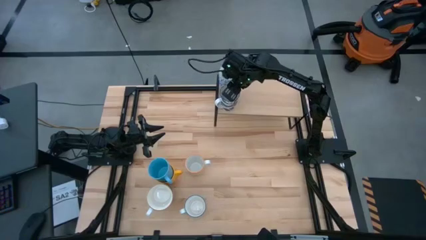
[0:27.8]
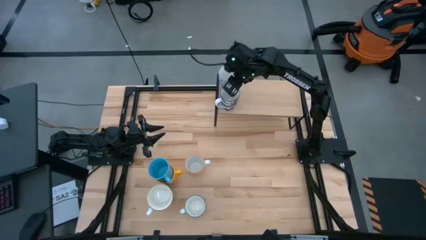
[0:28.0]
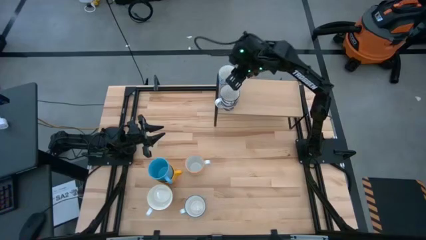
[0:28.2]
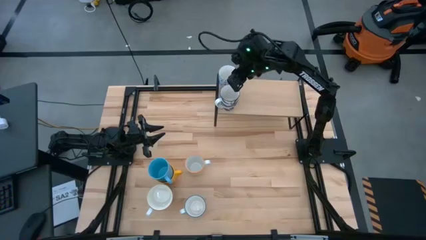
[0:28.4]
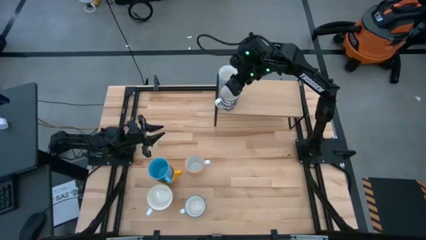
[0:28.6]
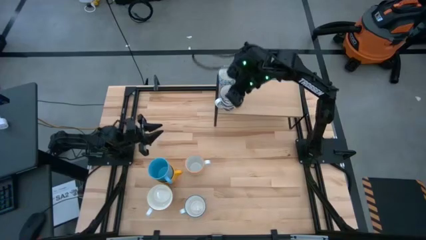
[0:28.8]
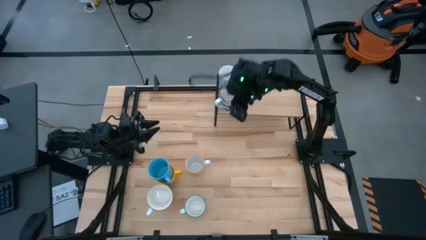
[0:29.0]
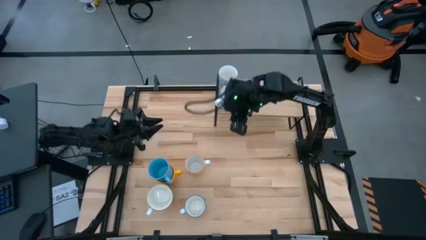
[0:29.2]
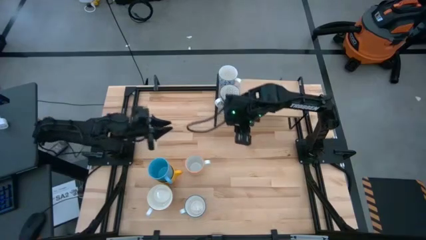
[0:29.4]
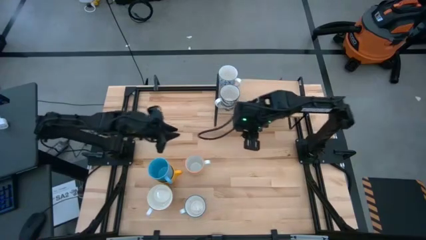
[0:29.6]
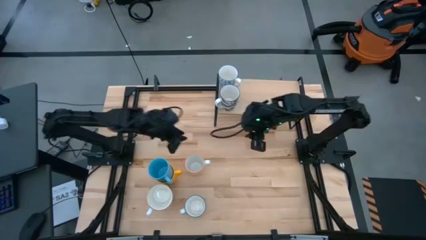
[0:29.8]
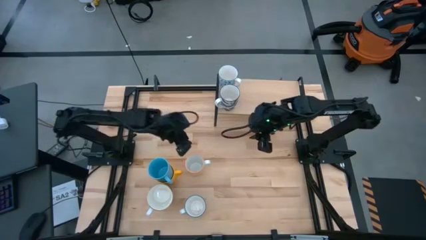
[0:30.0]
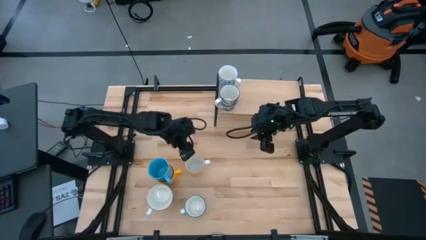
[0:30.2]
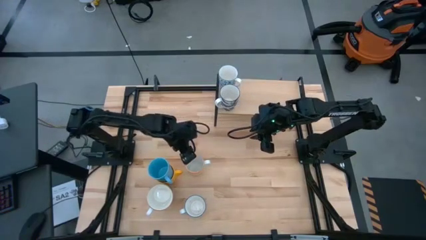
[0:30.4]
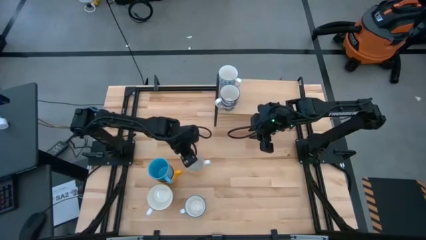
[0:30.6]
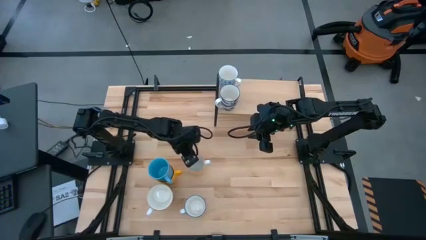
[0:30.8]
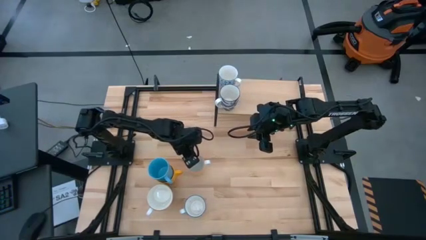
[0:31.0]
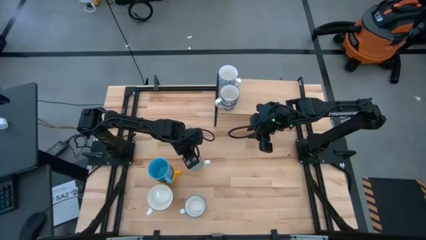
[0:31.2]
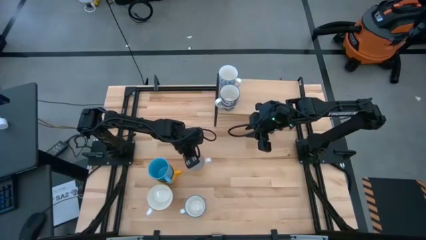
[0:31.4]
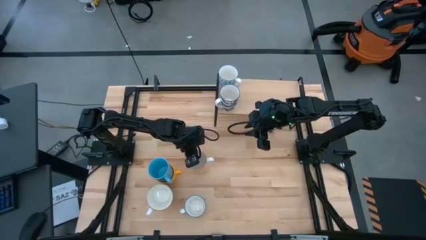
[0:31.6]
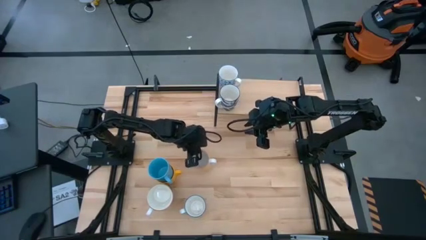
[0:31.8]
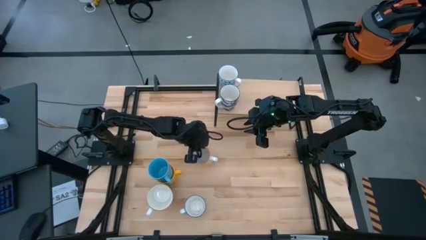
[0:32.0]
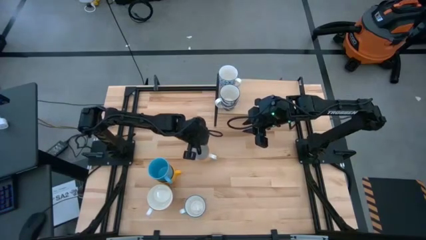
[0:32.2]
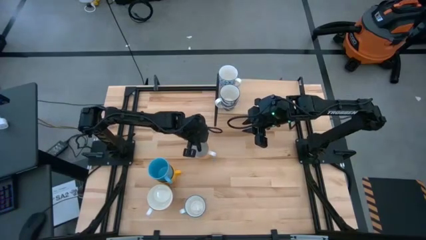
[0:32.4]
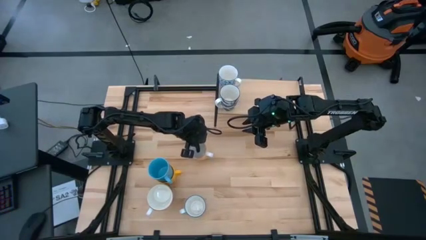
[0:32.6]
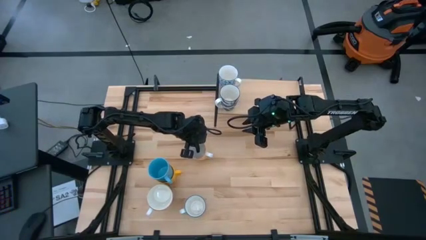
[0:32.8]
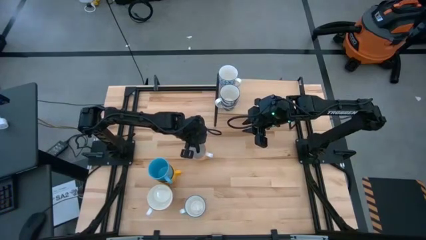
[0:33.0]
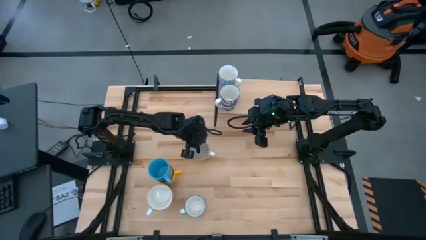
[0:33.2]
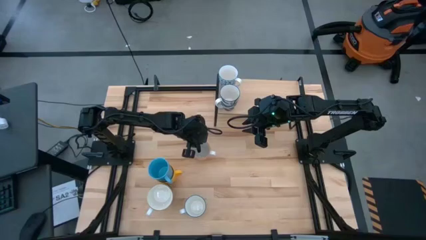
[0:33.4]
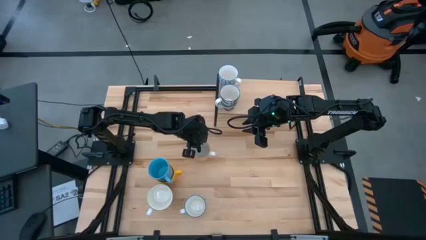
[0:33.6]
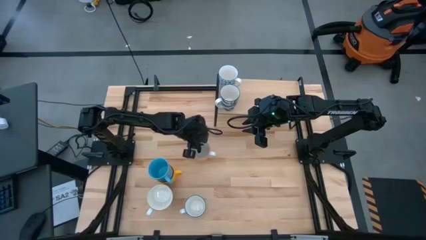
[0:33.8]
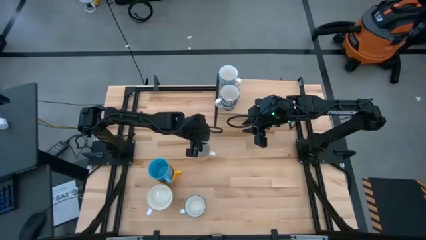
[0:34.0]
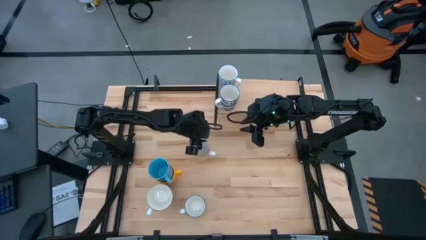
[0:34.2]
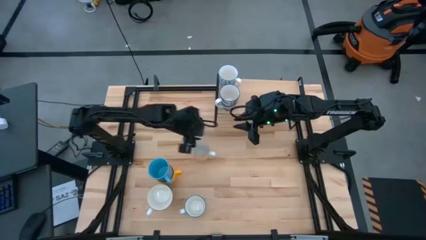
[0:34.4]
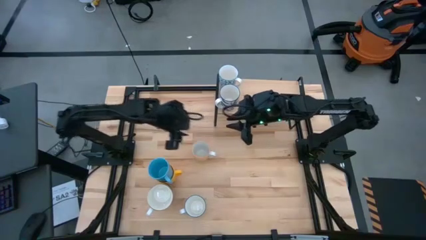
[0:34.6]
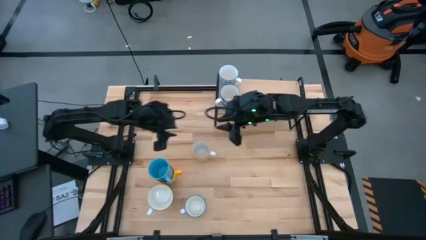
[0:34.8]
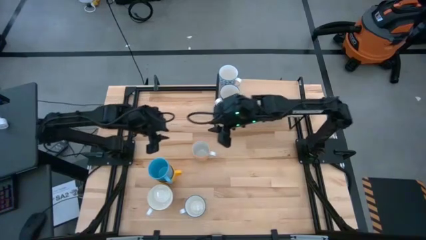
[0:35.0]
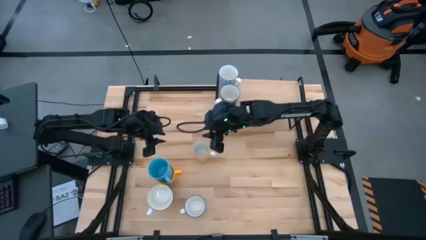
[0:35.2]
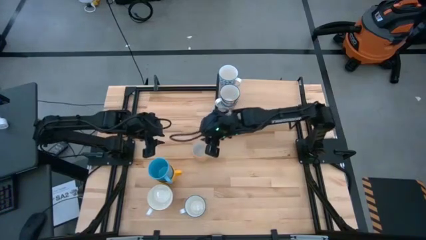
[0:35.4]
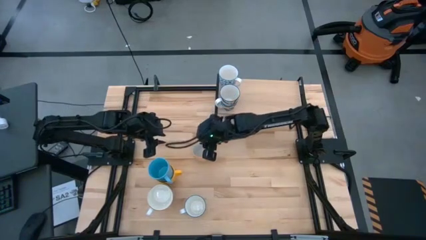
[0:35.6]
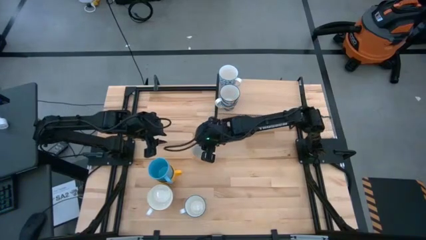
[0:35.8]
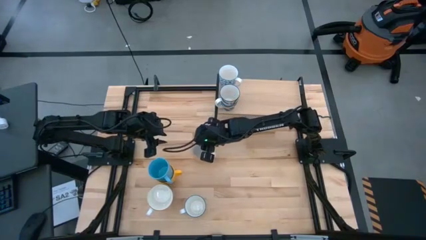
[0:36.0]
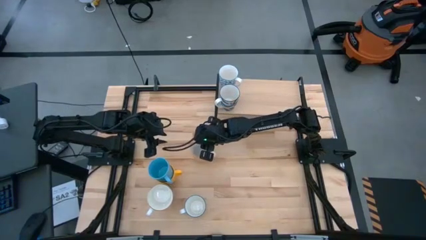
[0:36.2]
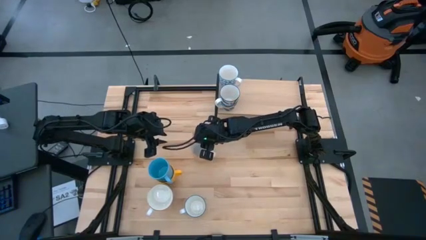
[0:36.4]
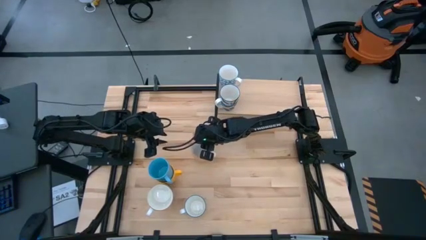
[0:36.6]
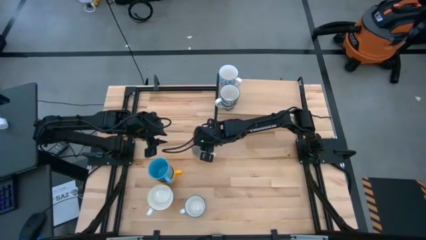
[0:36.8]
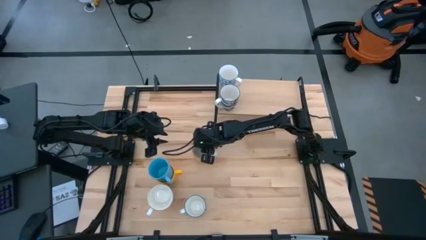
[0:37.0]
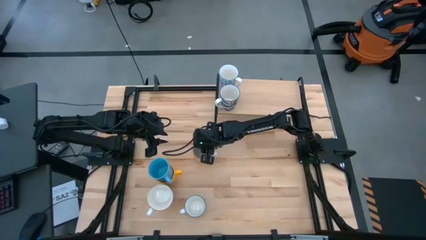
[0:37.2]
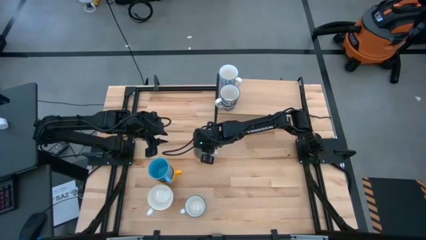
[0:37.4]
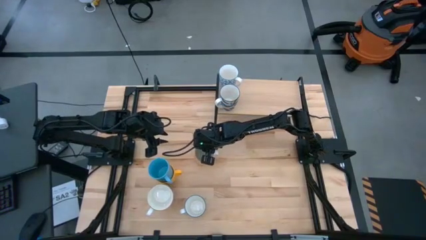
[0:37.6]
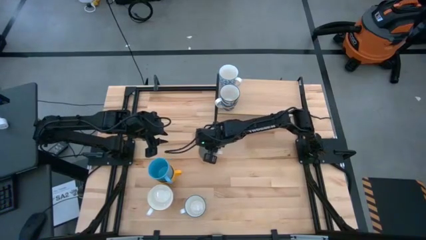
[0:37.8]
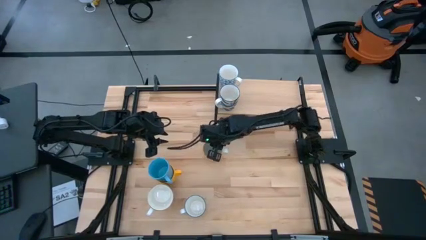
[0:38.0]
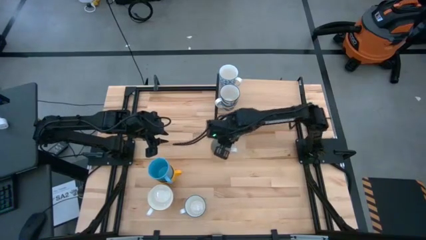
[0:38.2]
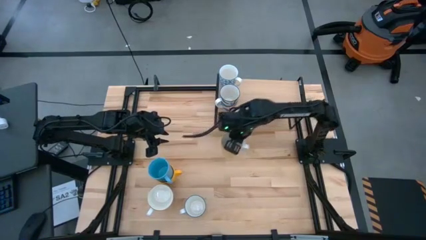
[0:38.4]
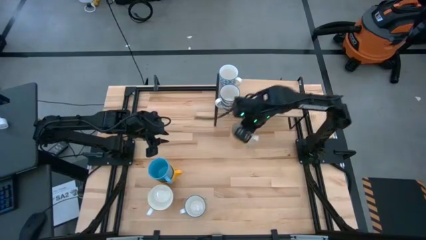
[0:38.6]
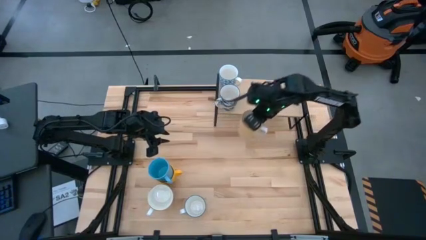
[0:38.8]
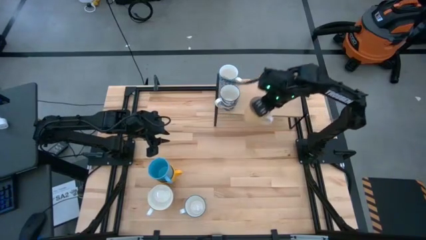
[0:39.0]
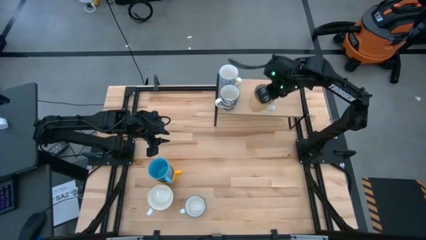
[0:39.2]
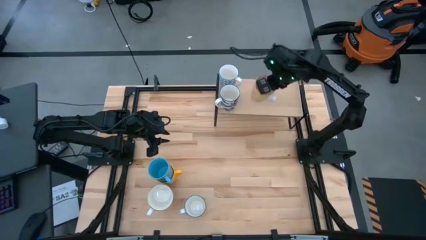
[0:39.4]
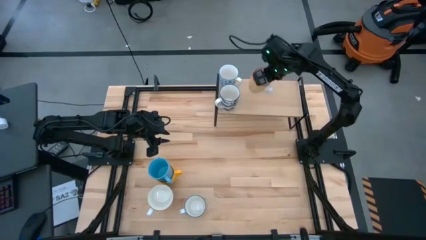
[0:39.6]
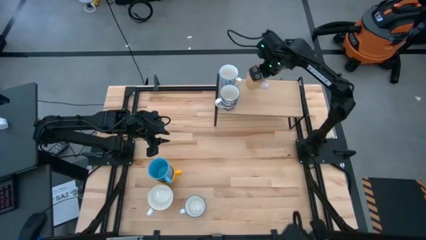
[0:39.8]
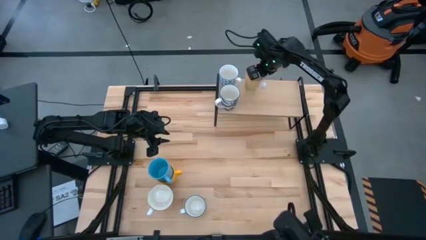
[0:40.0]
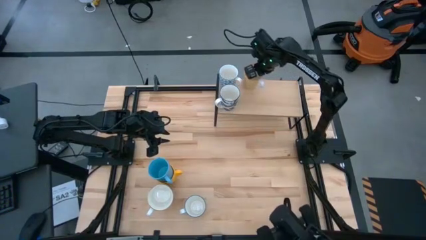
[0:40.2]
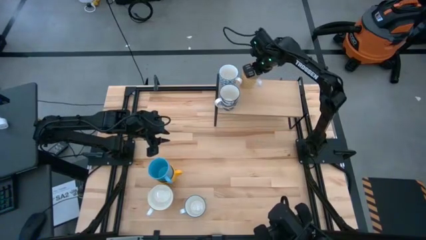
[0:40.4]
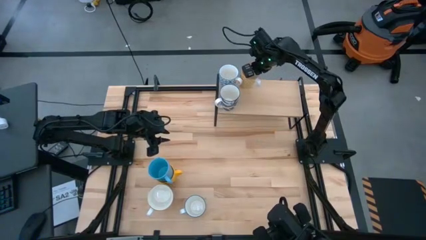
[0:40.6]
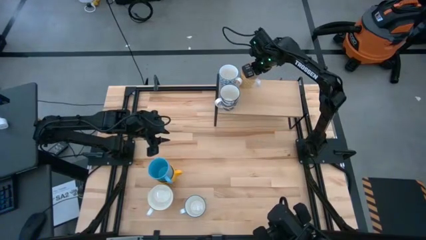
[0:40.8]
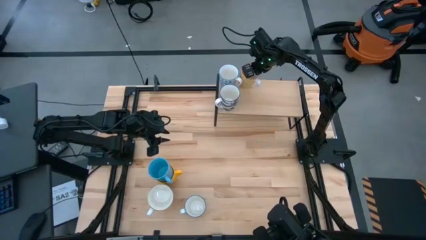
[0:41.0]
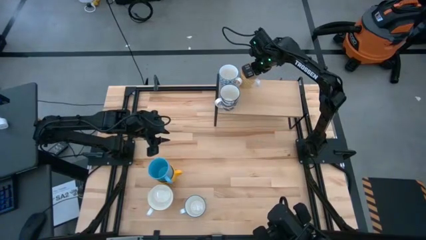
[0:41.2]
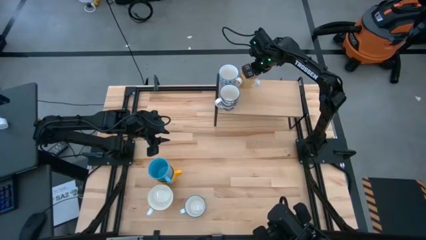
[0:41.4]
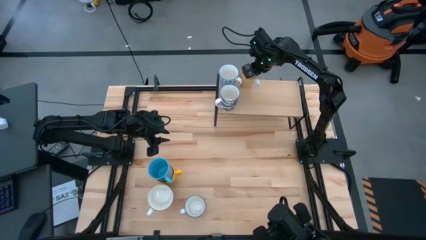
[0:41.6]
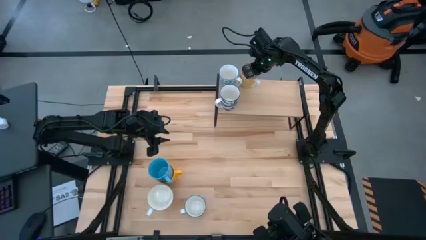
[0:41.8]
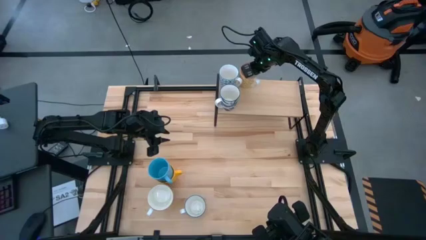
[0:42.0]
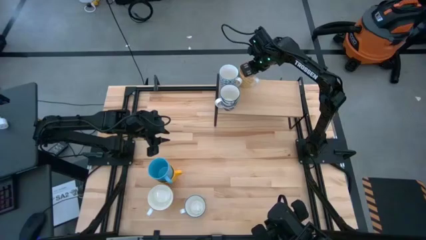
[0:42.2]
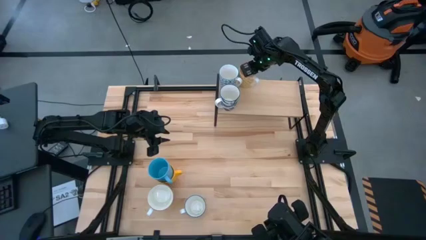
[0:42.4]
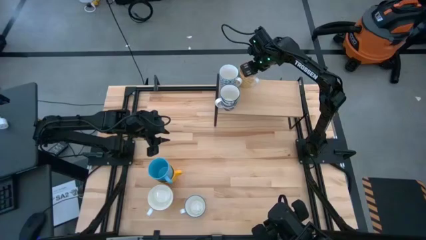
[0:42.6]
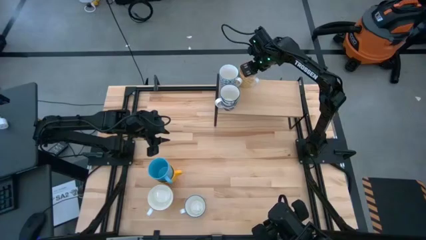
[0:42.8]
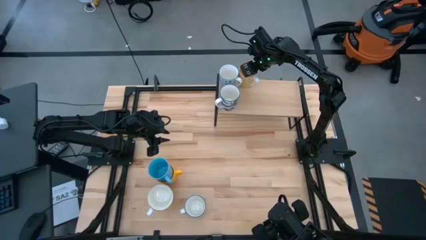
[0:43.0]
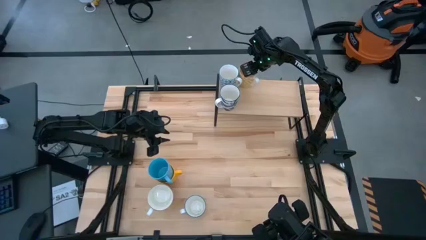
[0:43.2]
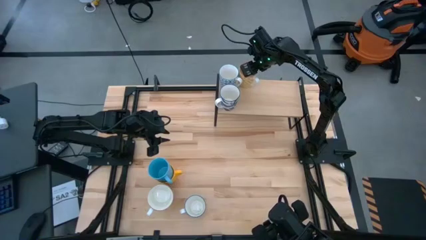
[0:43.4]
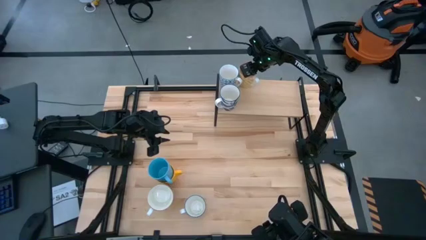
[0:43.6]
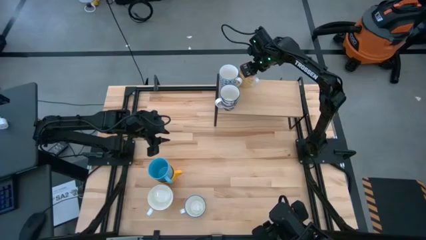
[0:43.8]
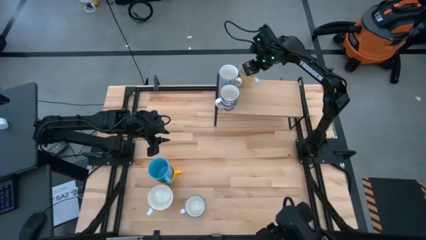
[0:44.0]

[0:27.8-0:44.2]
Task: Place coffee mugs
Put the yellow pattern mug on the shelf
